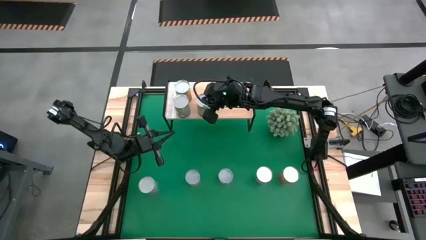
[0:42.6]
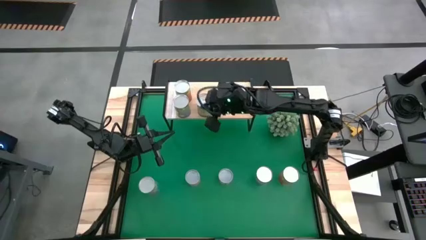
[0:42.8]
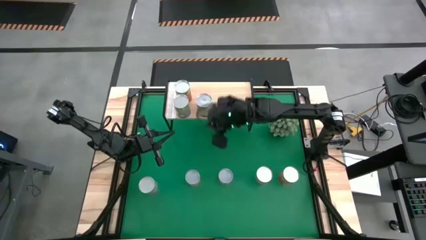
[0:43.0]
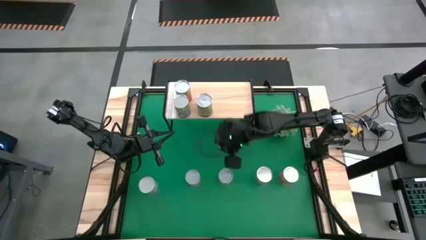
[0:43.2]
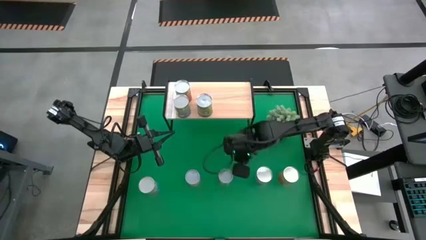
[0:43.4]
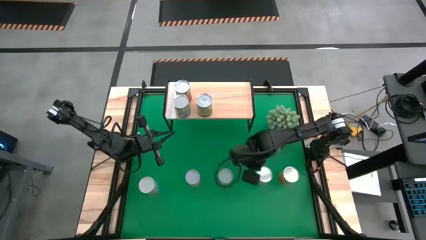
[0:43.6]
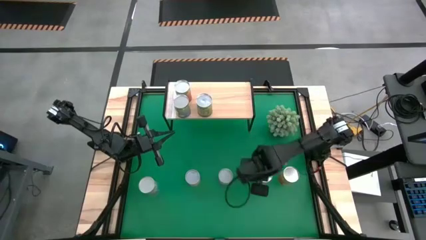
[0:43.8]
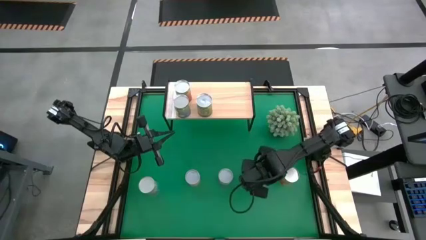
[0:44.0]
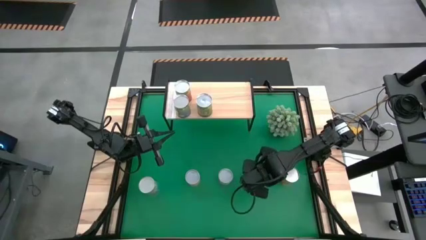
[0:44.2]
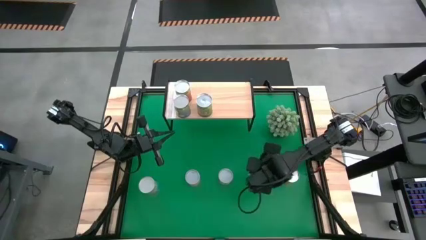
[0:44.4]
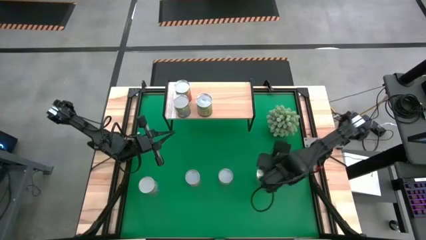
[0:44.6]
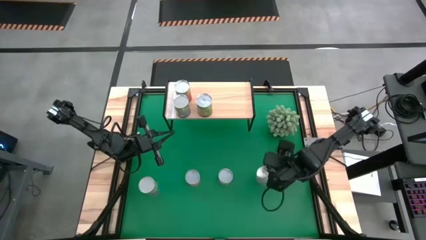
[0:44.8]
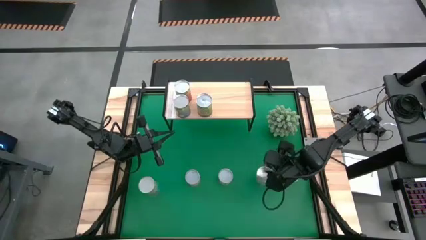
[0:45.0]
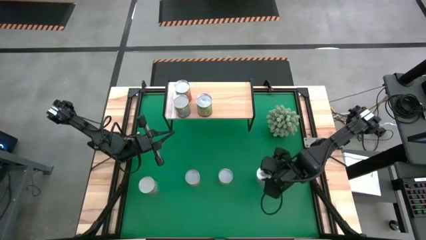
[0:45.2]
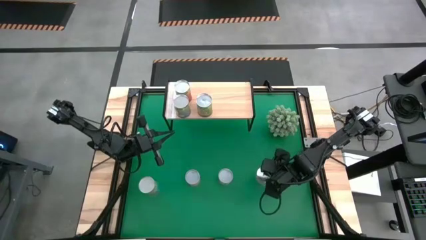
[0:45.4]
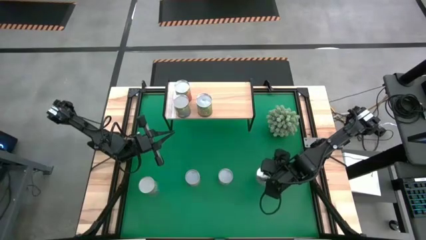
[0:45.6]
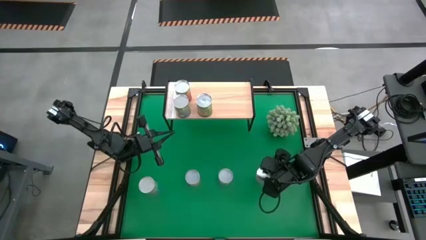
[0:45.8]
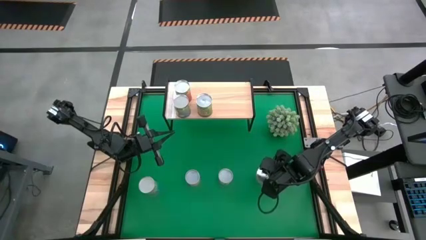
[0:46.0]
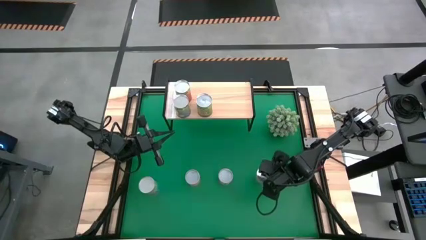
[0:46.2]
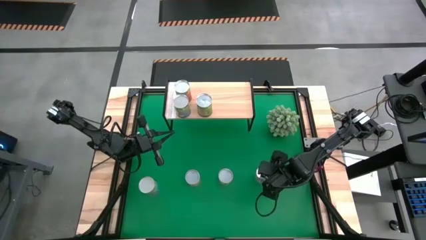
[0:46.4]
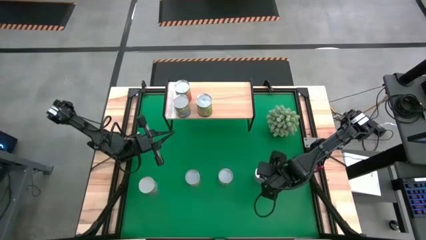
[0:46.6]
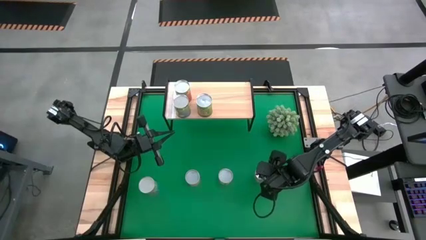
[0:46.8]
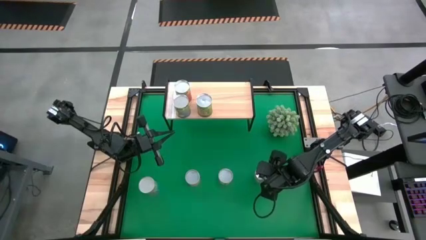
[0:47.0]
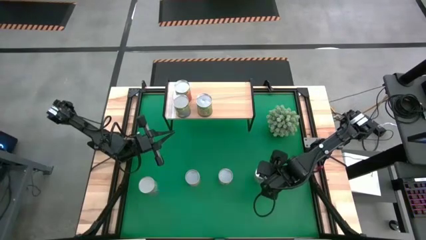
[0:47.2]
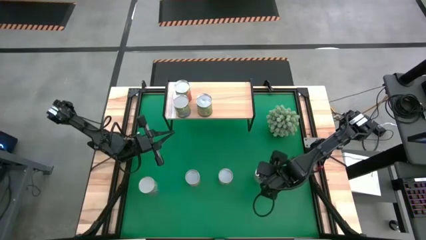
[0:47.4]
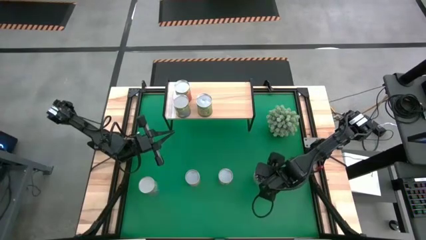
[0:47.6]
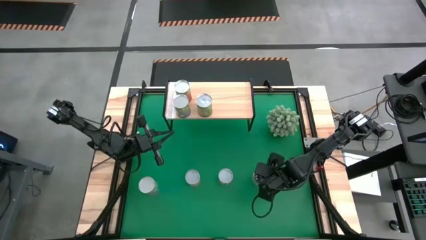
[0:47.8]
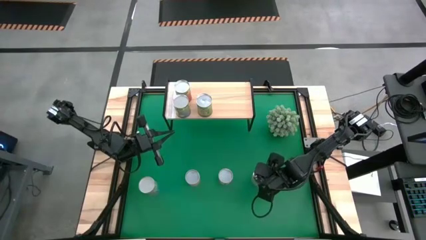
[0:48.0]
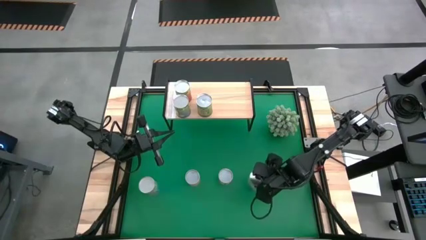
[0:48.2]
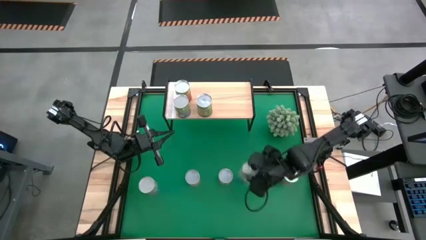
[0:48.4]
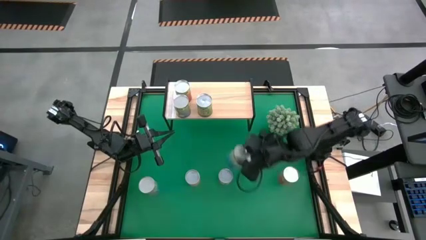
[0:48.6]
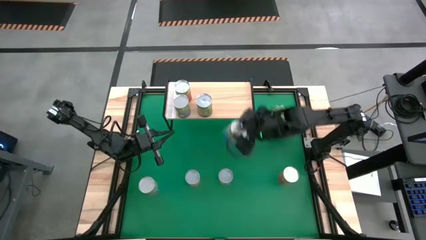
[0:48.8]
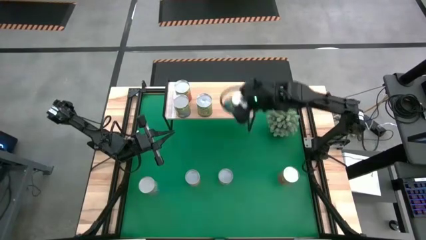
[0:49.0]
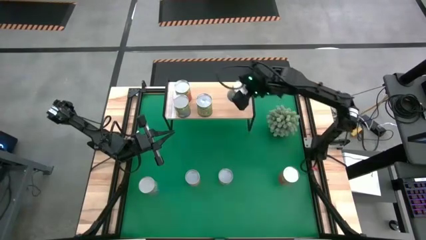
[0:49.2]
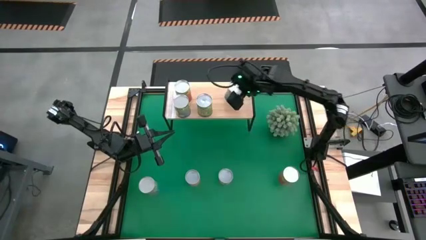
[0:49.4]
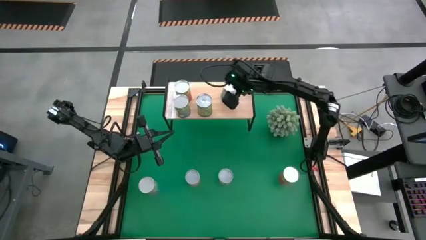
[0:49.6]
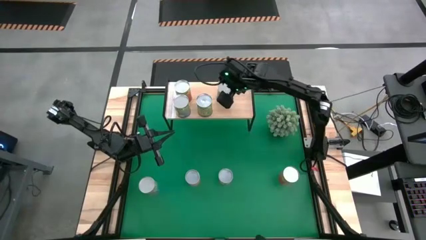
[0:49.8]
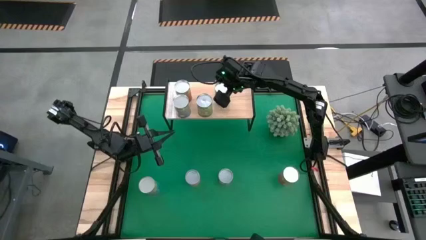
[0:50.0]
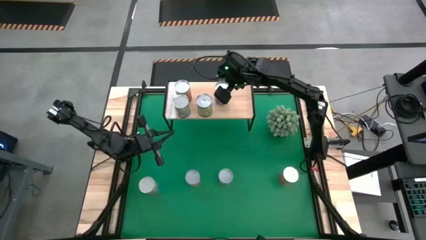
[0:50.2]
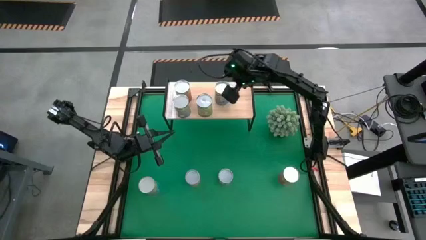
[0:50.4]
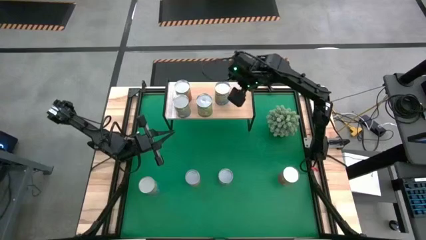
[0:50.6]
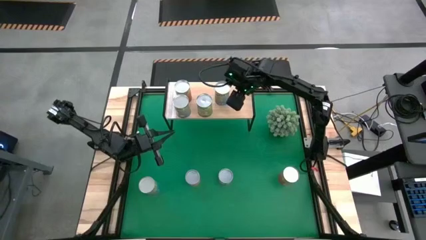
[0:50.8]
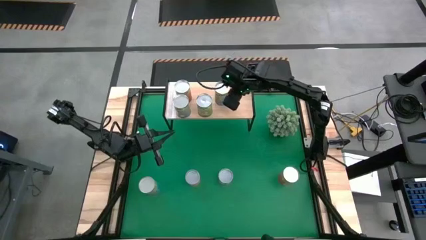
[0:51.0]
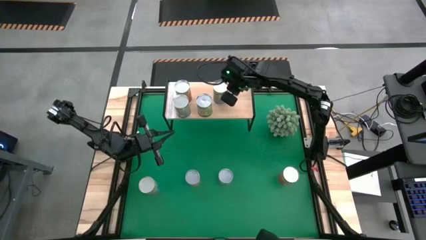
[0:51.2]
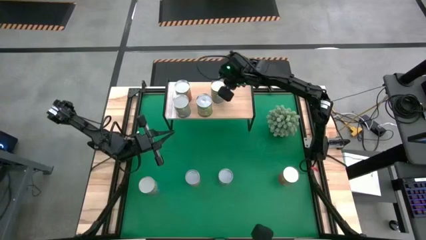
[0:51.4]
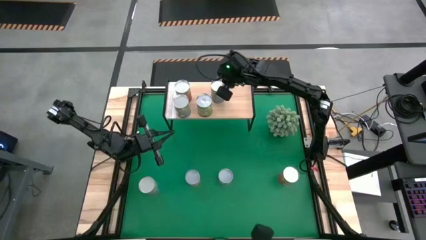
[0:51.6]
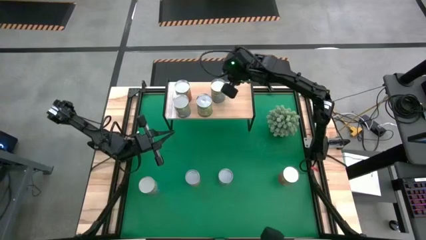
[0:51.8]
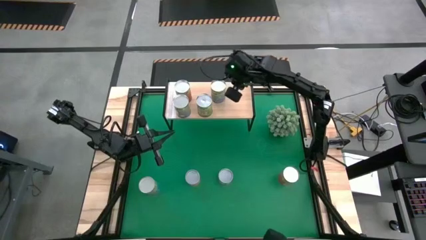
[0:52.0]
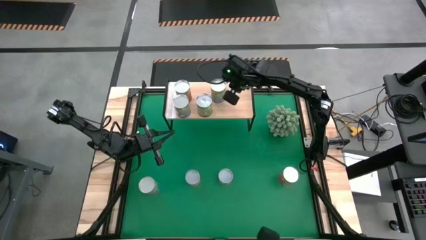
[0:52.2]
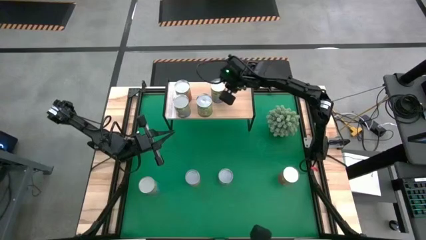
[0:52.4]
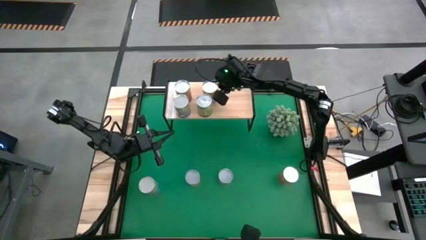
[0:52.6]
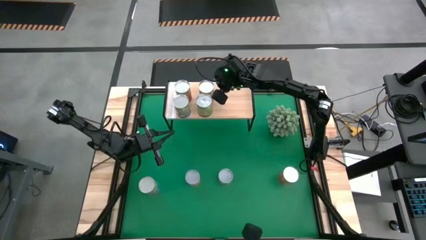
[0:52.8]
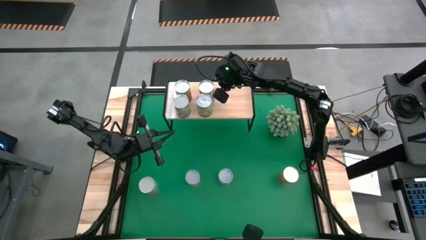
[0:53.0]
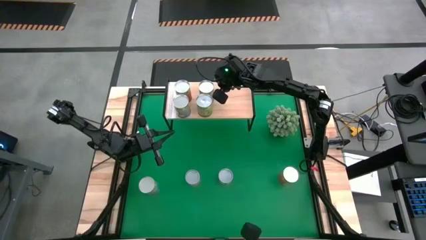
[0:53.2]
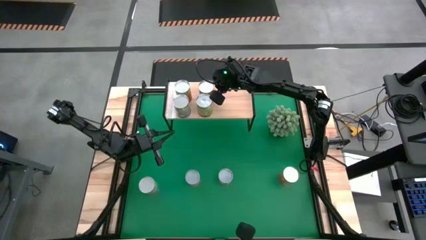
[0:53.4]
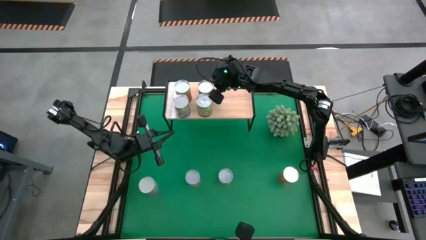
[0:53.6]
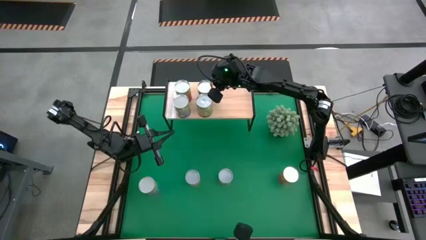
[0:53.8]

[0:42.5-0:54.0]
Task: Pick and place cans onto a shelf
Put the right canned cherries on the shelf

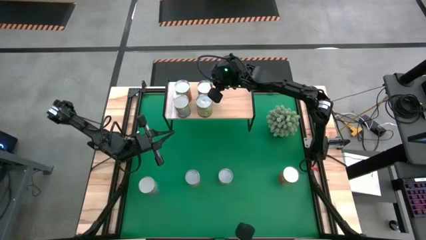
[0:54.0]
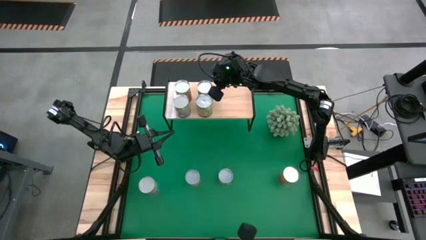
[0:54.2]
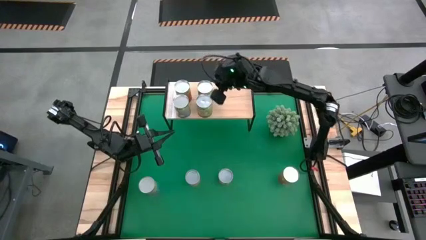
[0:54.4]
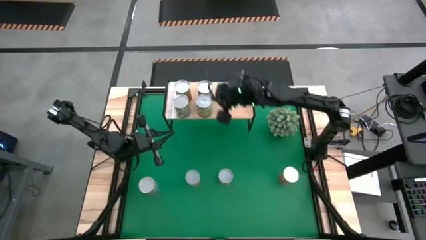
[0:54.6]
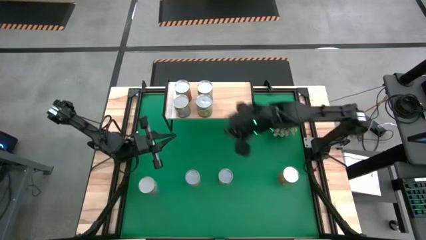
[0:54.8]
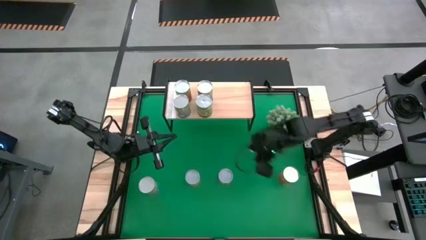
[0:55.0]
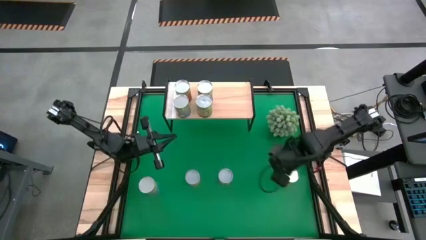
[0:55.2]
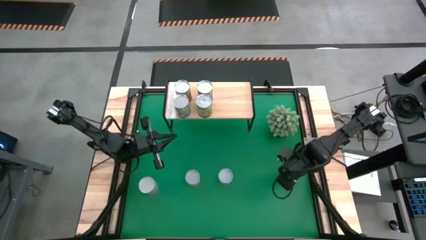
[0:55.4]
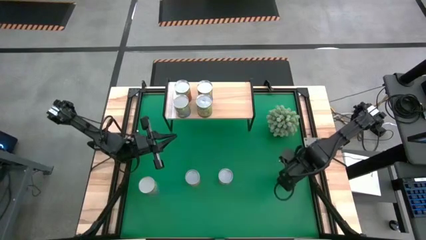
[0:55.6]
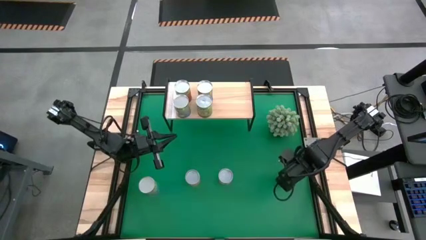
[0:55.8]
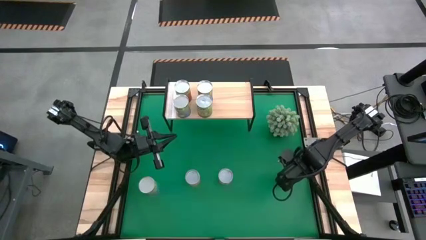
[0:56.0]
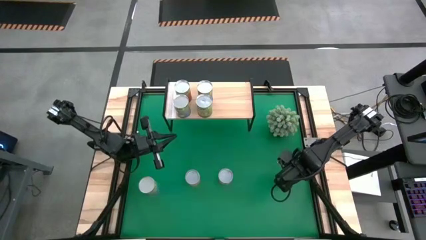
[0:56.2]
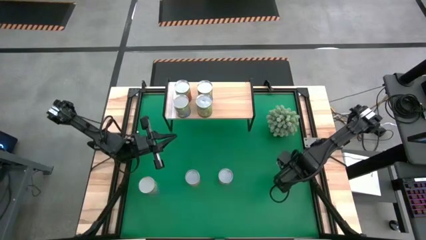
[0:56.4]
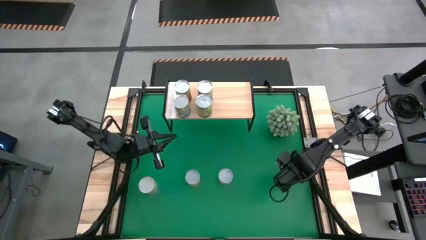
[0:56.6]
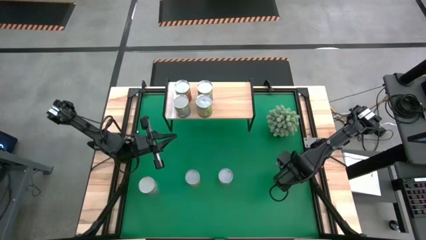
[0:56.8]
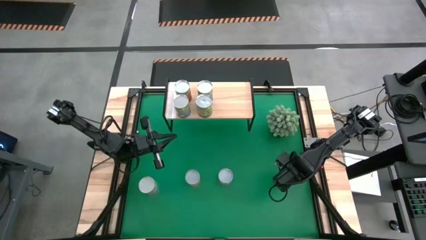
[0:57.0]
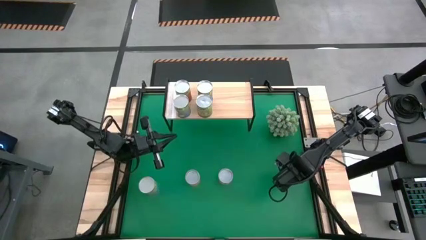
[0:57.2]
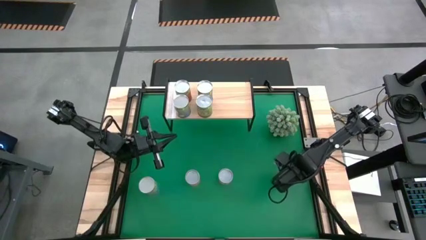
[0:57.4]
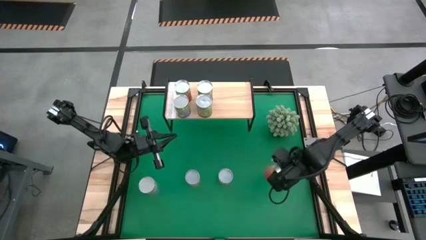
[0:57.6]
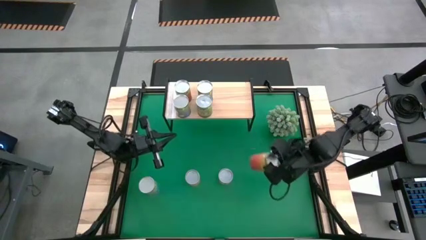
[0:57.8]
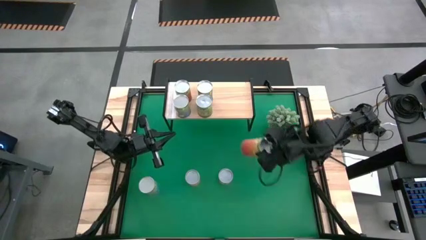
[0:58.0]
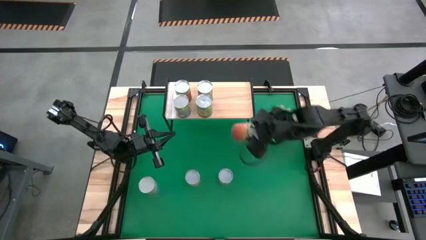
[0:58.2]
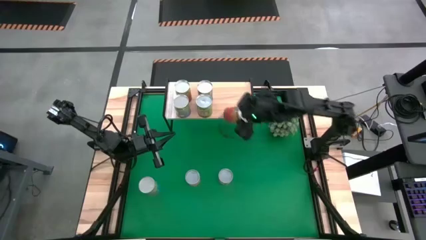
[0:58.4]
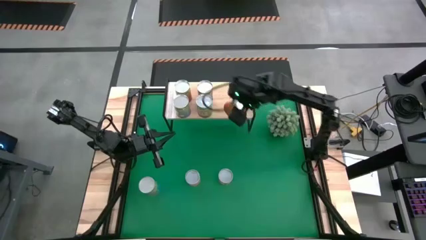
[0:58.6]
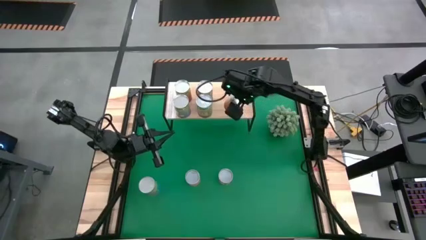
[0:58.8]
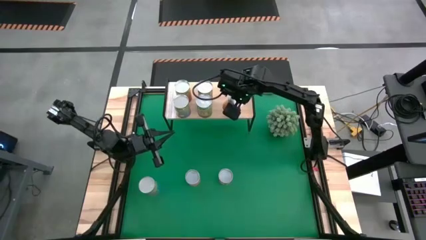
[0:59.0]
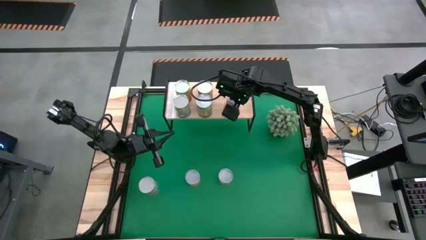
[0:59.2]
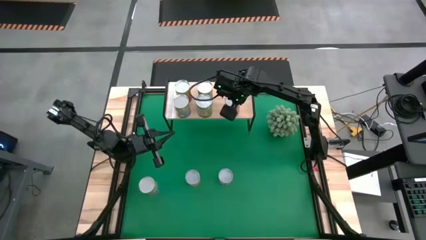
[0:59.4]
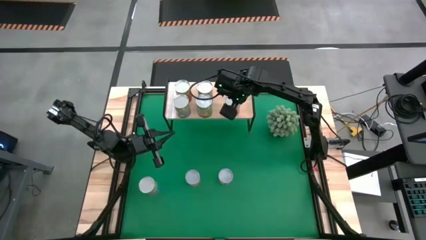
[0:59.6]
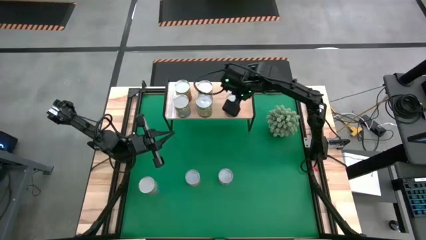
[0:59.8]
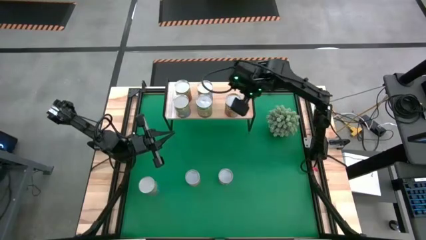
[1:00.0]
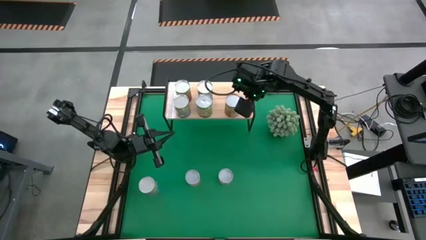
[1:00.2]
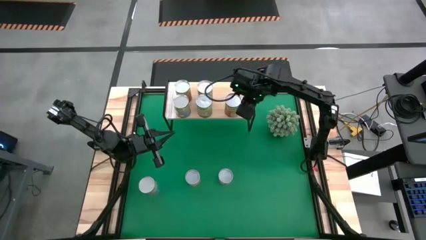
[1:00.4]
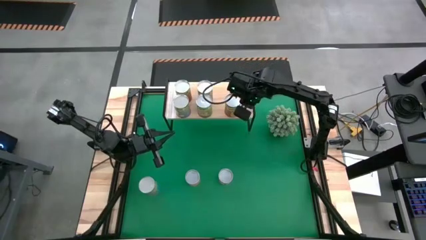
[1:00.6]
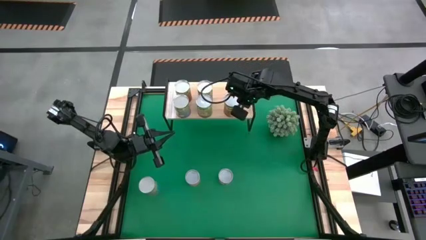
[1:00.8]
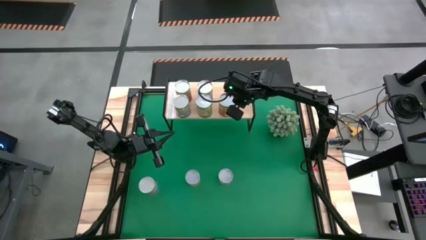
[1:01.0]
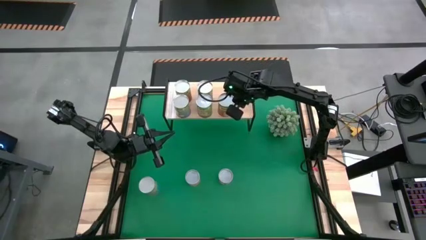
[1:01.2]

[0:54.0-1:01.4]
Put the canned pineapple on the shelf
